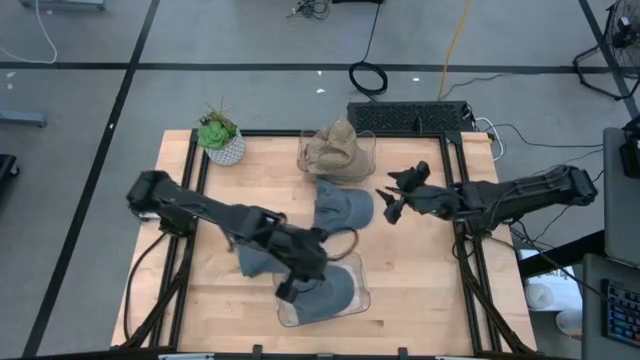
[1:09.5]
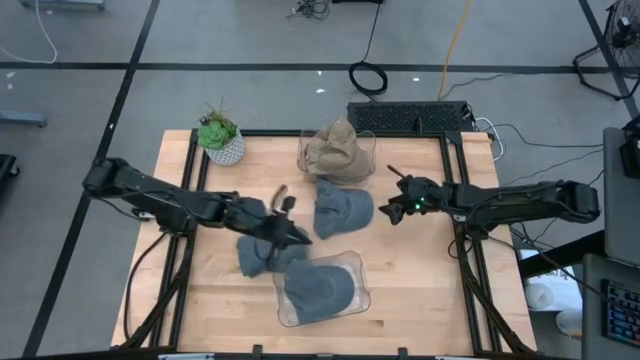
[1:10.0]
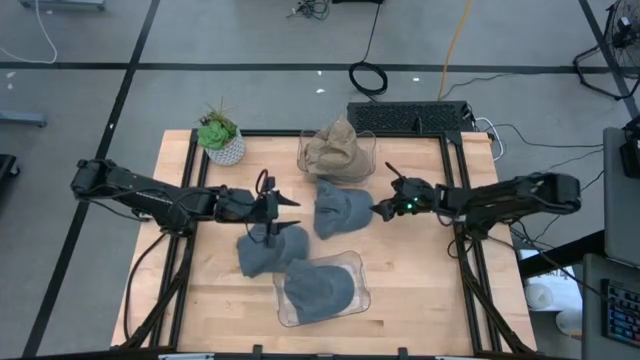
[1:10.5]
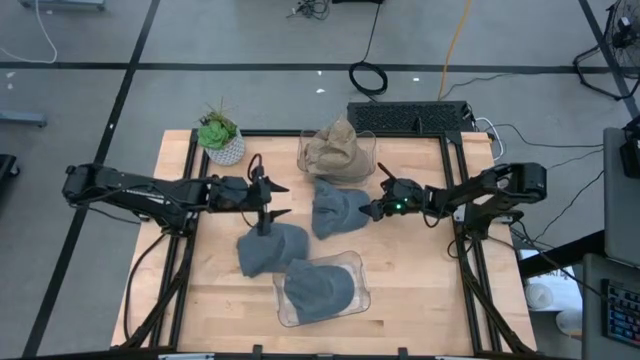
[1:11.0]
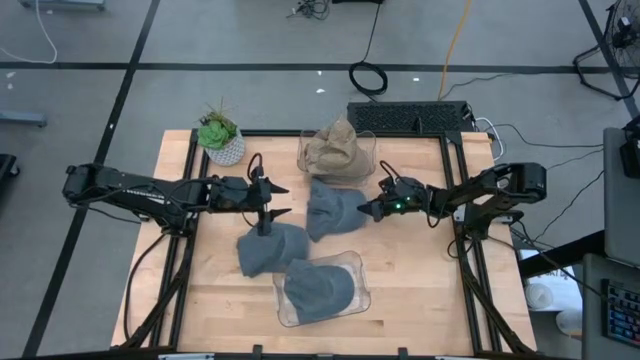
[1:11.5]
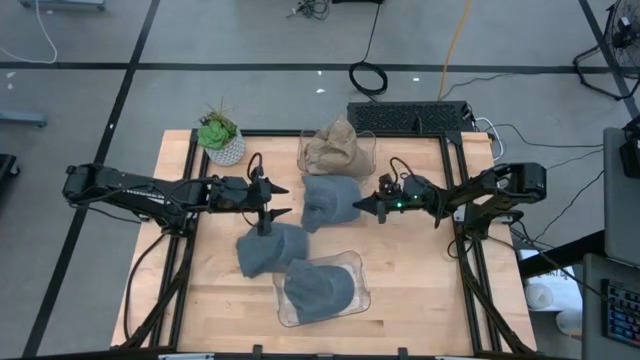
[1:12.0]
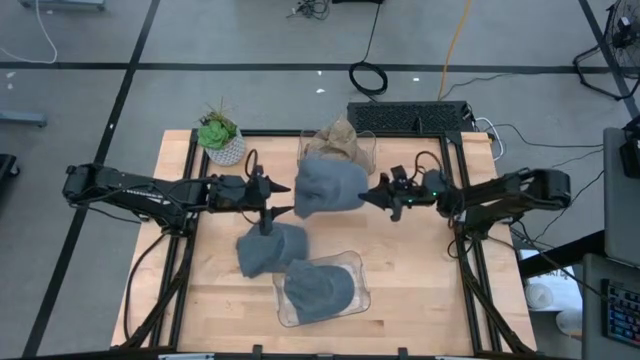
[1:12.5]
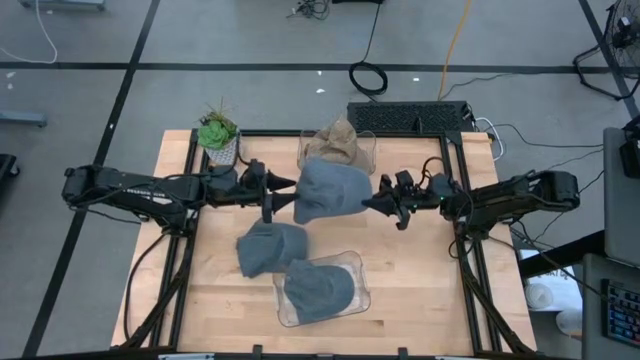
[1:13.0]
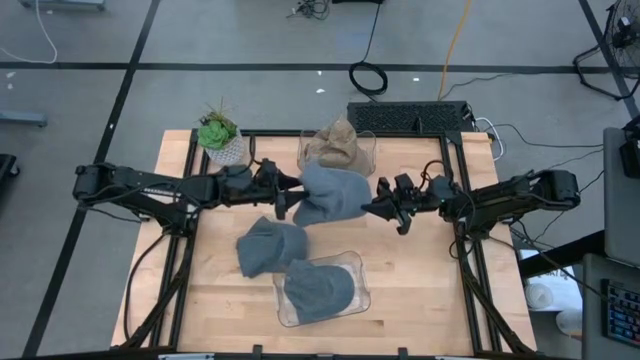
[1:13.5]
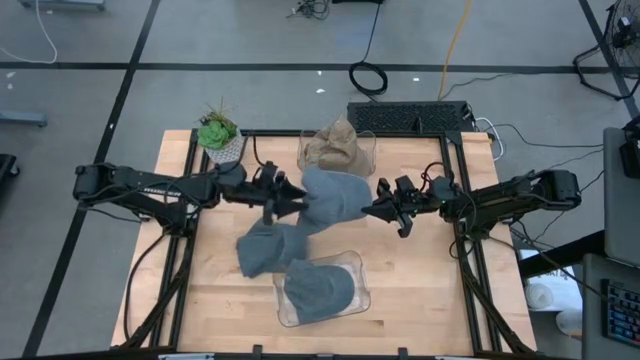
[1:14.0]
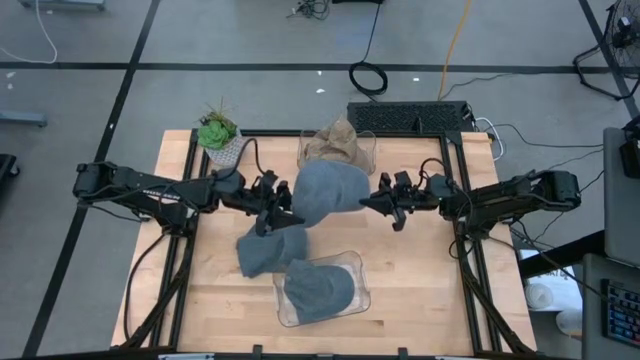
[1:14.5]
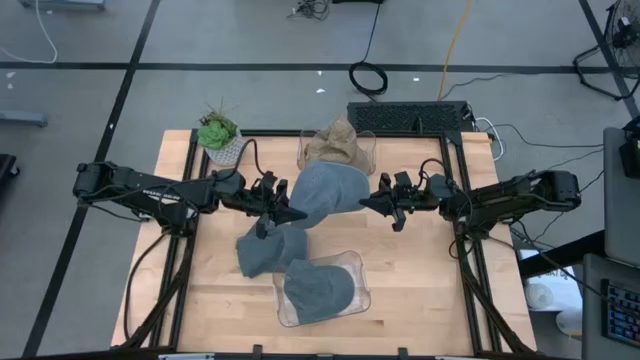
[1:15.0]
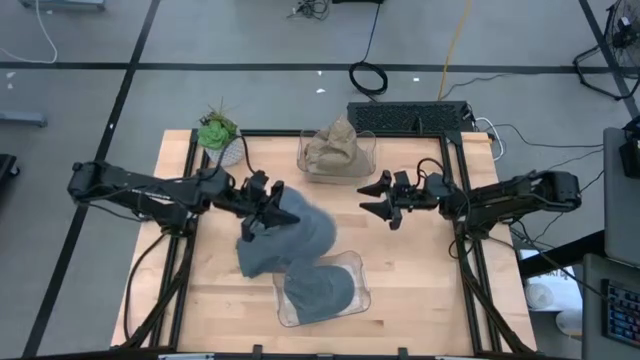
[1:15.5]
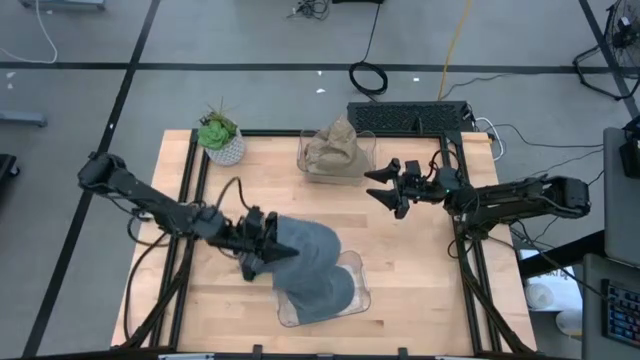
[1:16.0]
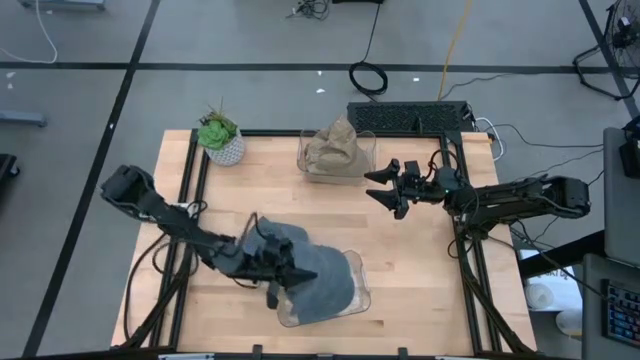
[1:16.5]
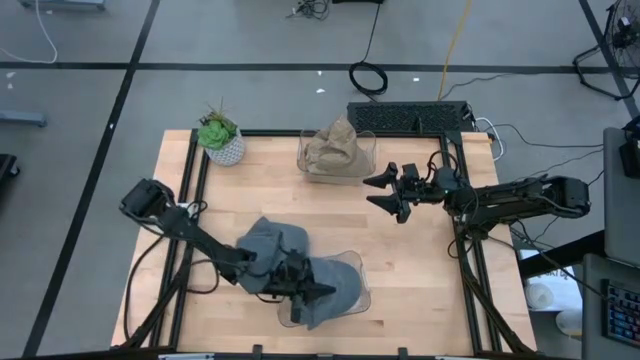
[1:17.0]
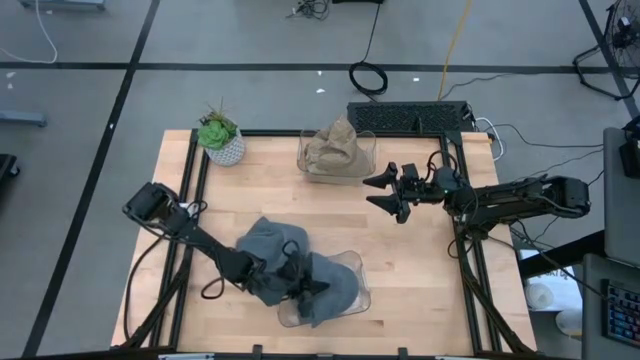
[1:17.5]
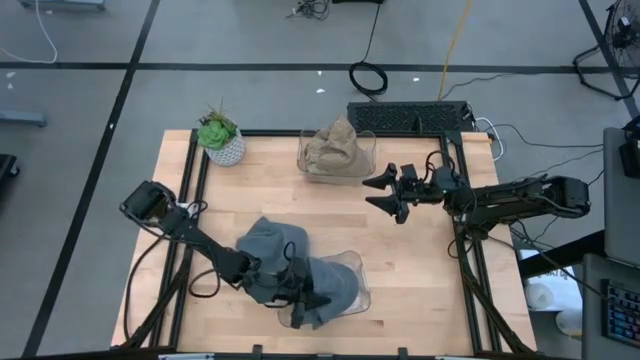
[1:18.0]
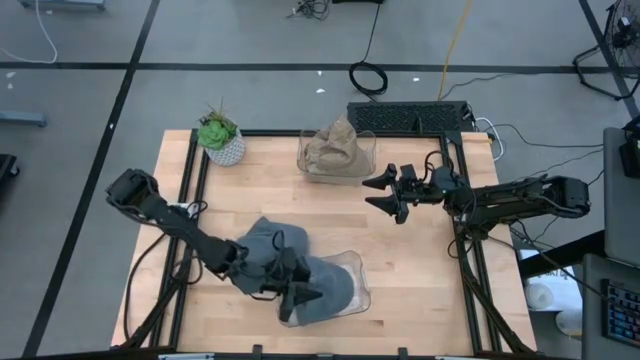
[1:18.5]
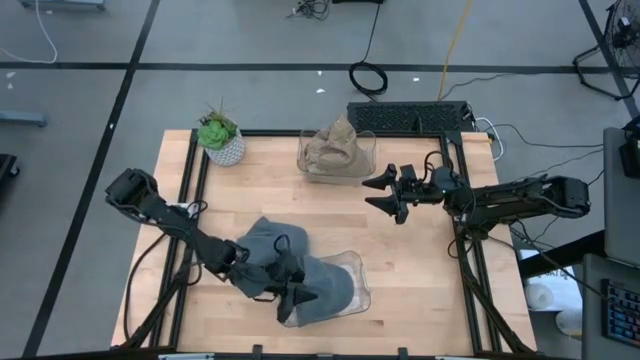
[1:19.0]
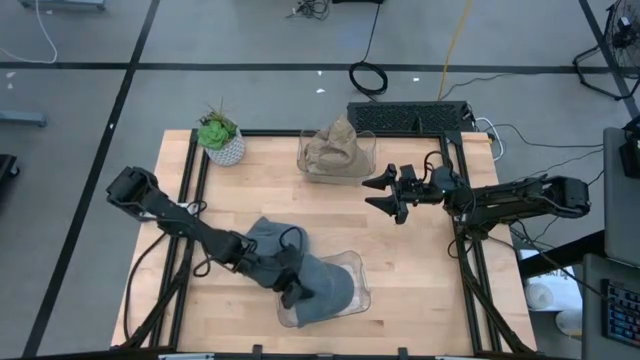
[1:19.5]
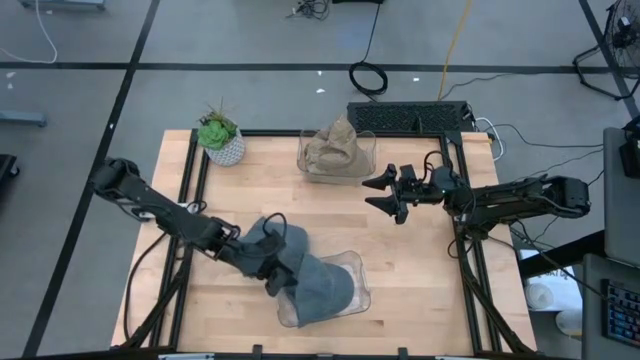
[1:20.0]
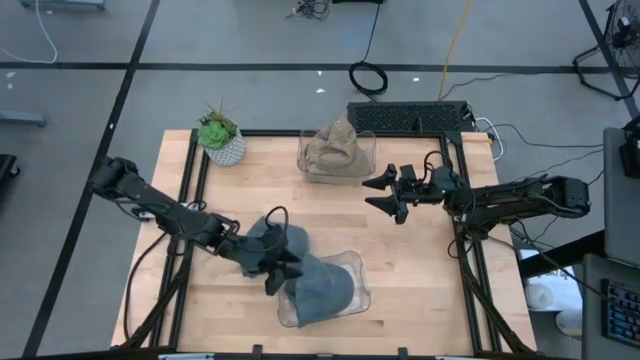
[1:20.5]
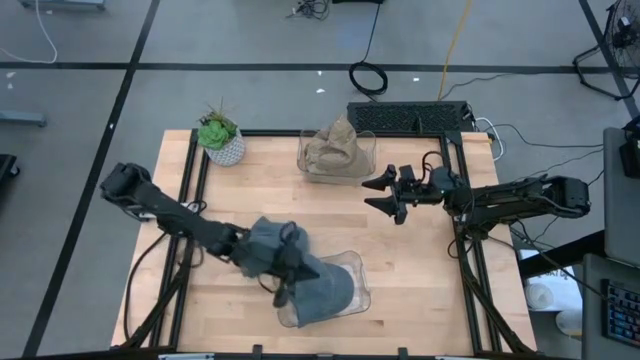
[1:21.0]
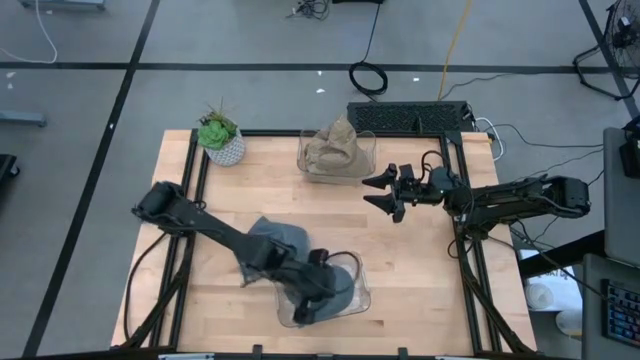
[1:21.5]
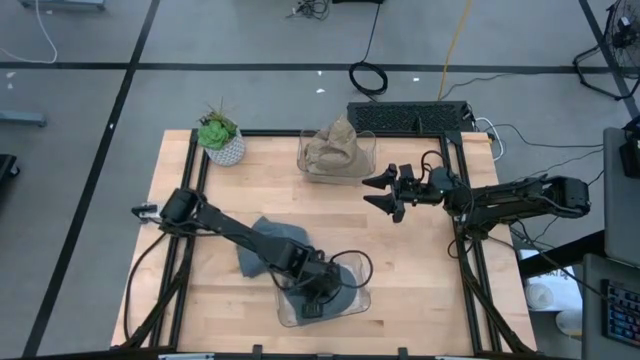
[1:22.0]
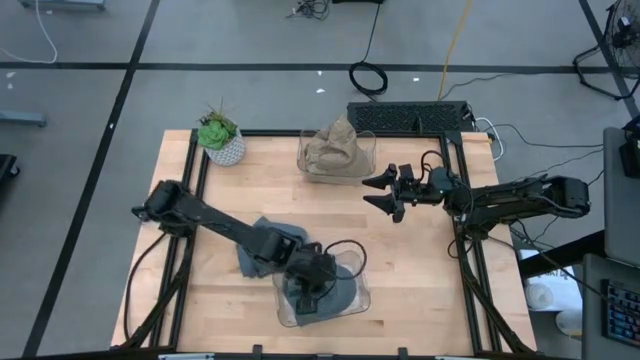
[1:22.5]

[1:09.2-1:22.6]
Task: Pick & Place hat
Put the right blue cap into the bottom transparent bin

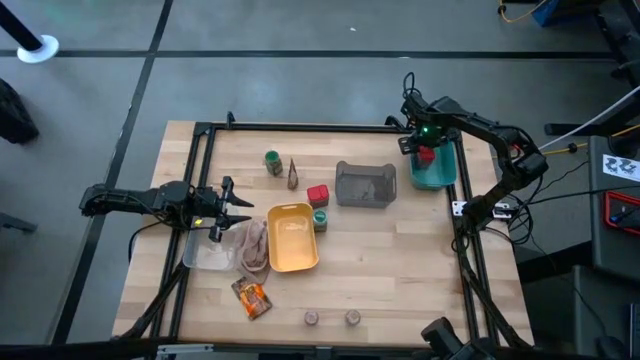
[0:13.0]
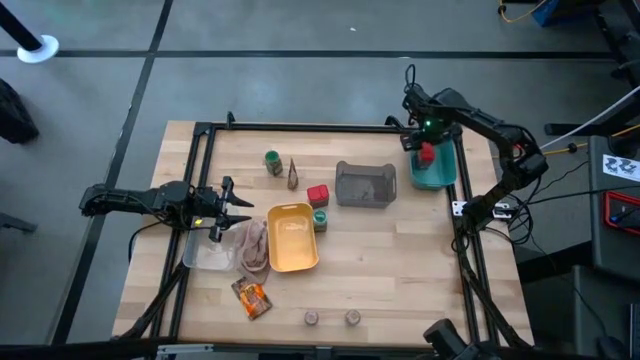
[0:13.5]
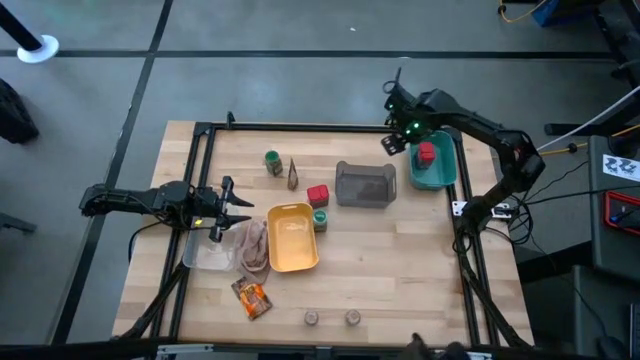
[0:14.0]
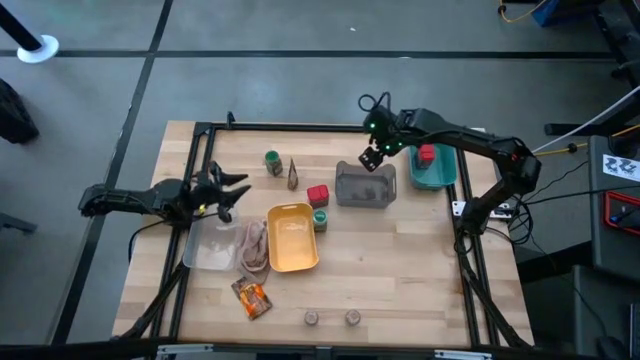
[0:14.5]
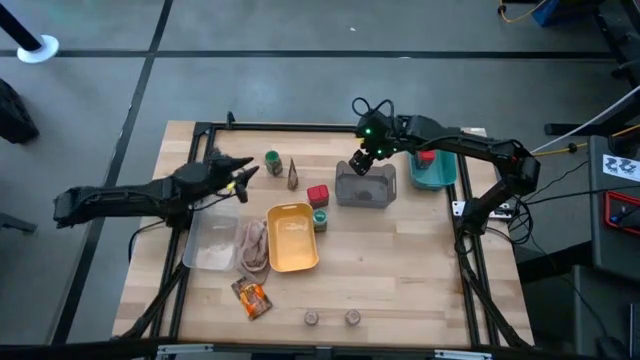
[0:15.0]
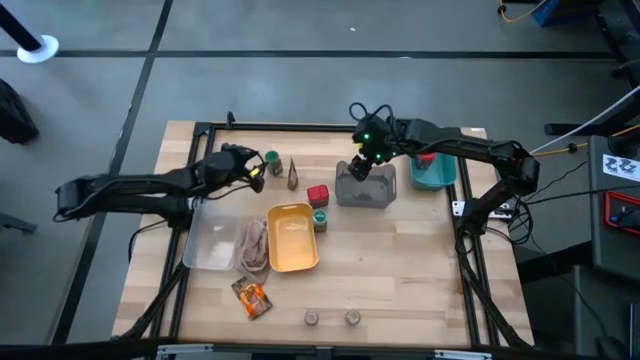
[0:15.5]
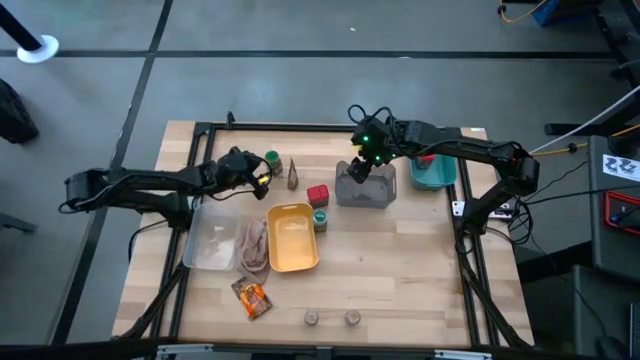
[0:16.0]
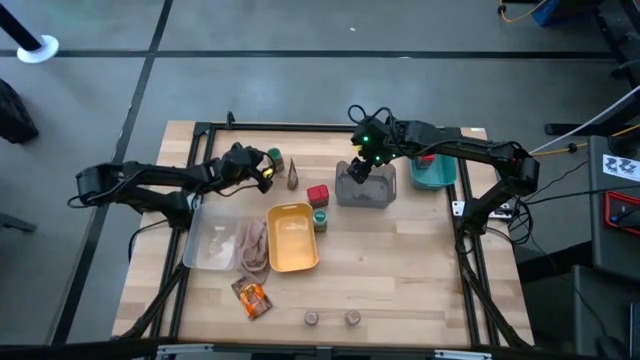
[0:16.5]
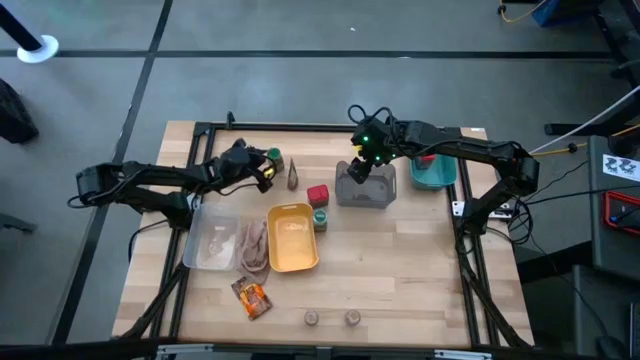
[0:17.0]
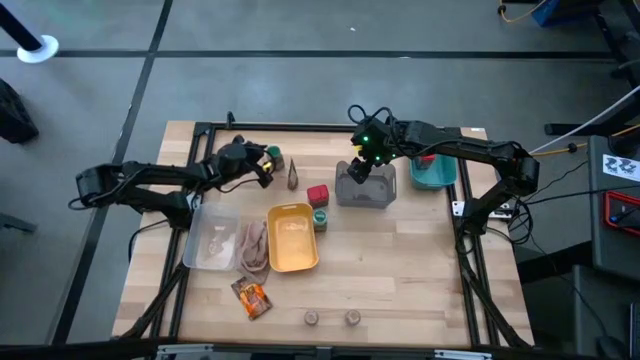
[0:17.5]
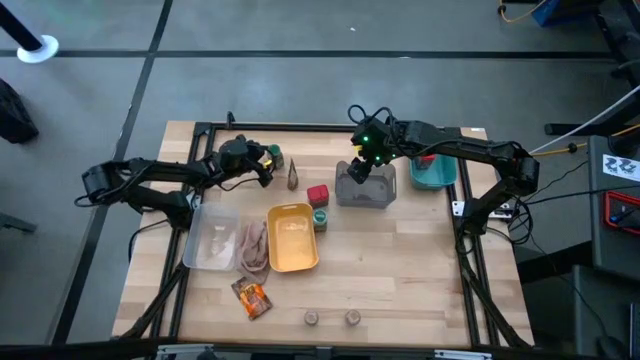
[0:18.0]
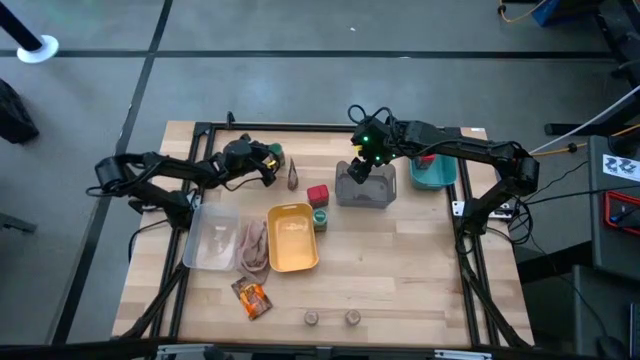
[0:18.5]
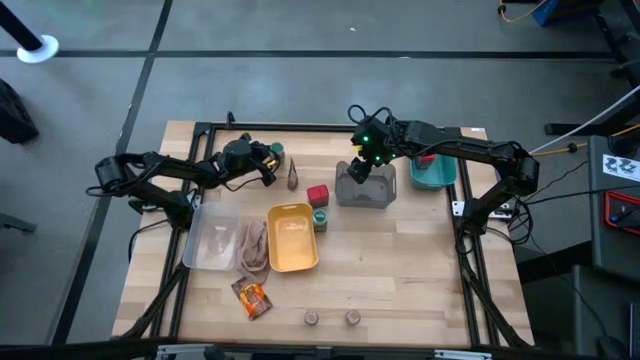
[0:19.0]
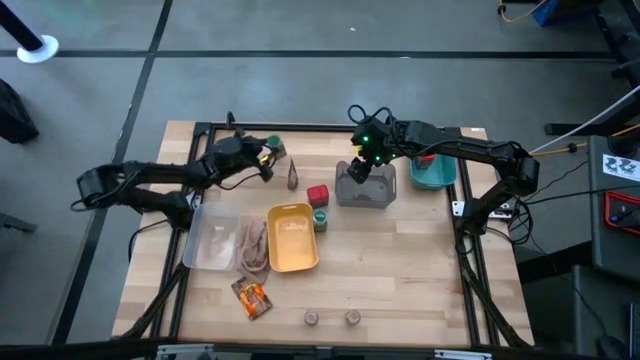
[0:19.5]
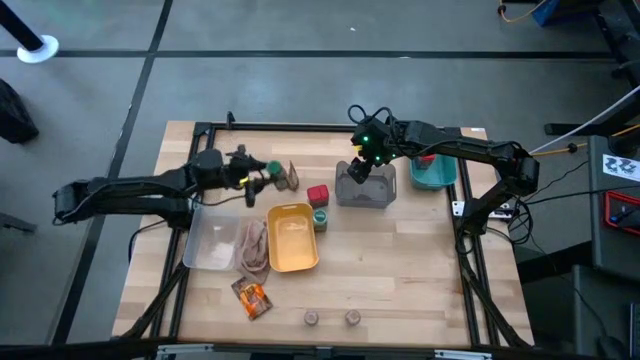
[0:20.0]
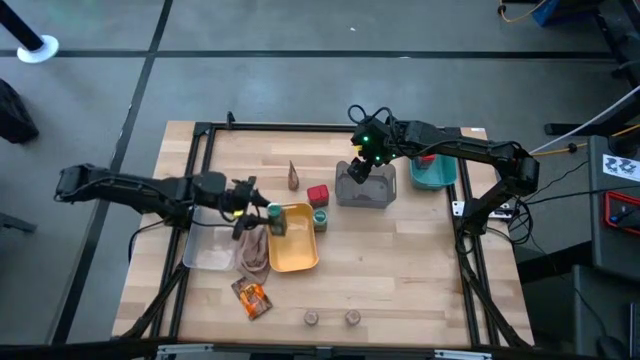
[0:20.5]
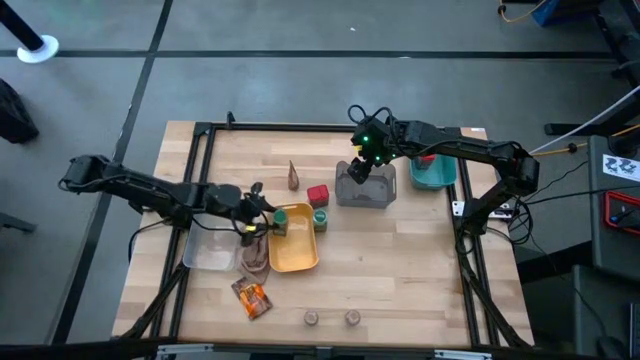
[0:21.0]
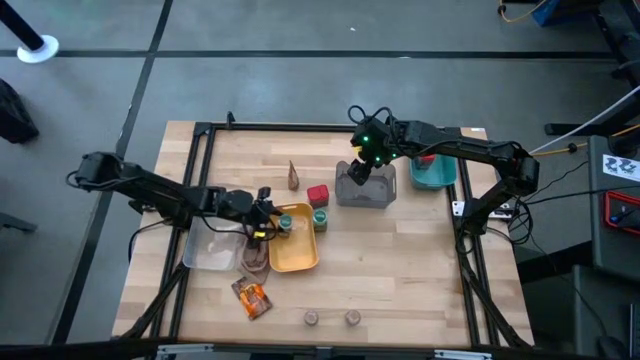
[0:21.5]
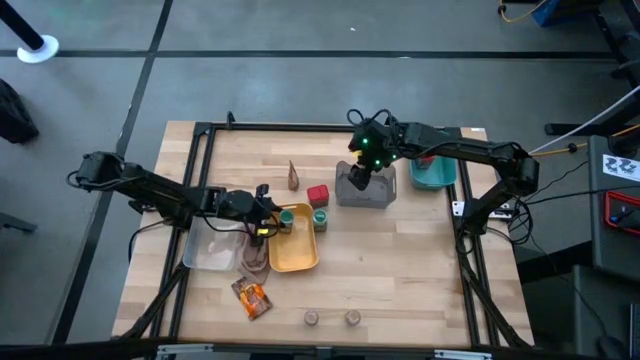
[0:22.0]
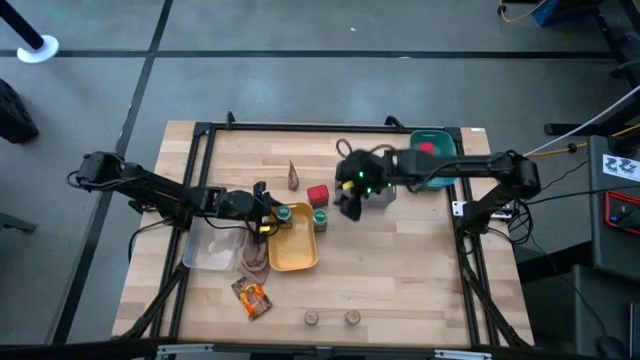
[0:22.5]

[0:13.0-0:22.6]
Task: Sort spices by type
Put the top green seasoning bottle into the yellow bin
